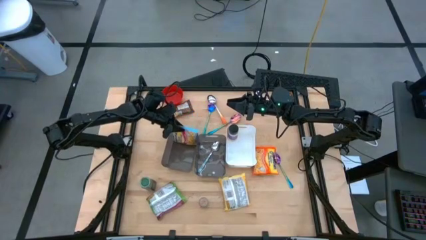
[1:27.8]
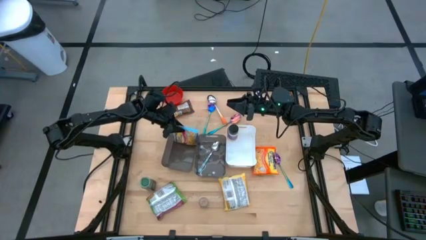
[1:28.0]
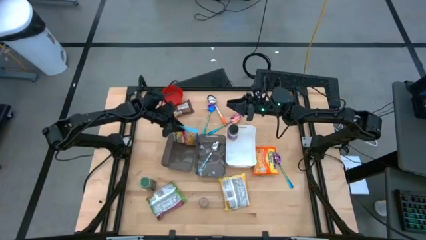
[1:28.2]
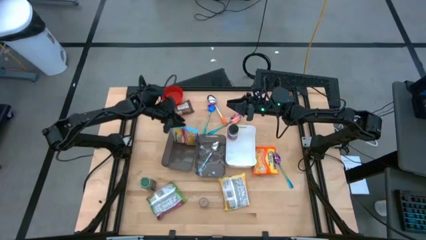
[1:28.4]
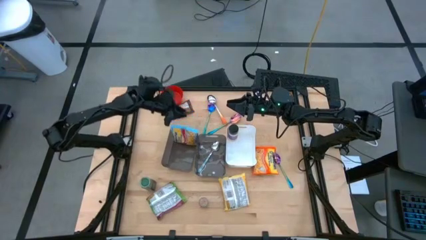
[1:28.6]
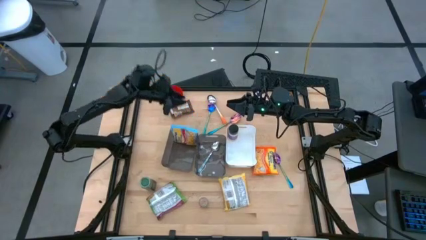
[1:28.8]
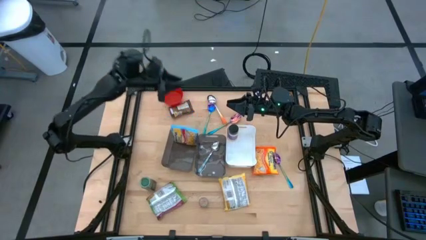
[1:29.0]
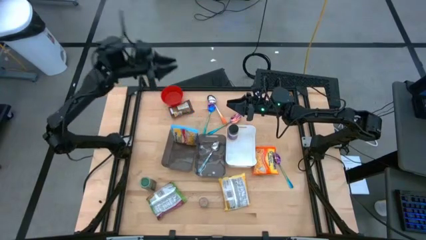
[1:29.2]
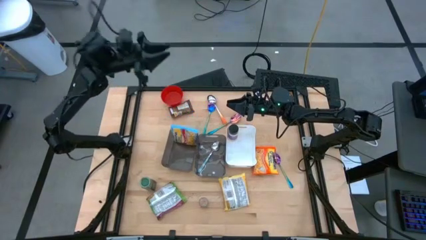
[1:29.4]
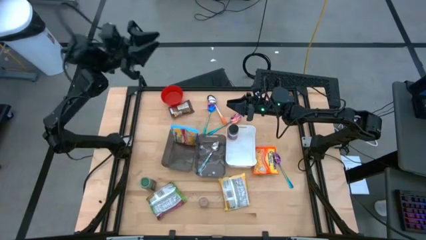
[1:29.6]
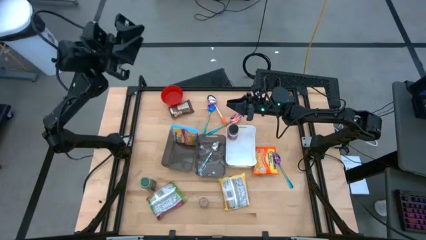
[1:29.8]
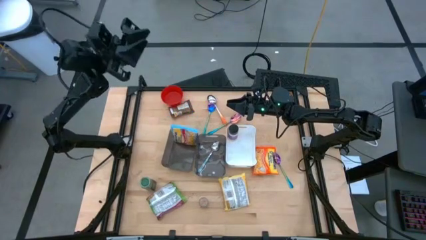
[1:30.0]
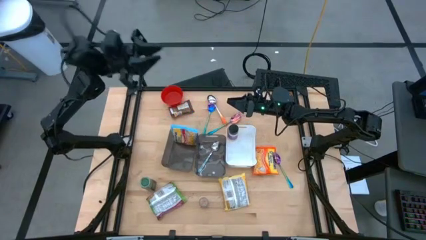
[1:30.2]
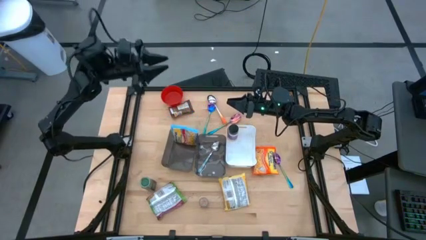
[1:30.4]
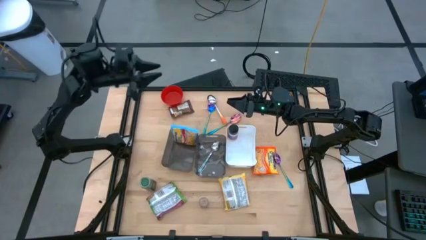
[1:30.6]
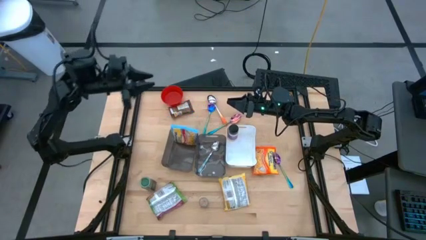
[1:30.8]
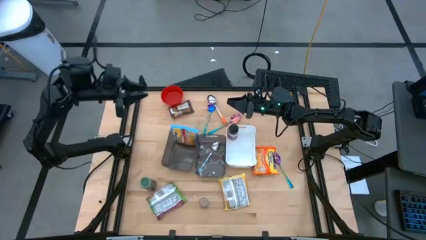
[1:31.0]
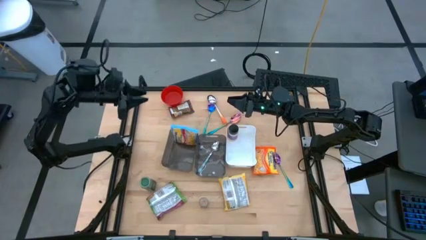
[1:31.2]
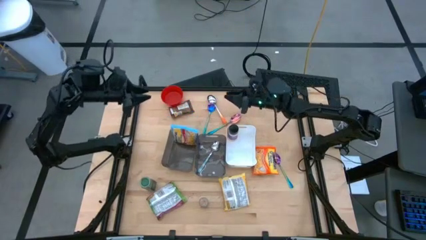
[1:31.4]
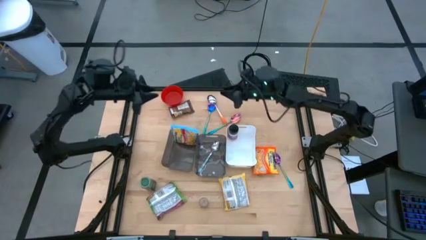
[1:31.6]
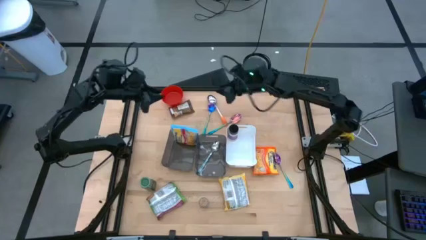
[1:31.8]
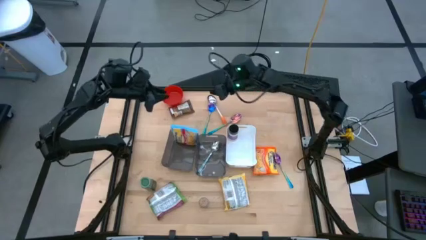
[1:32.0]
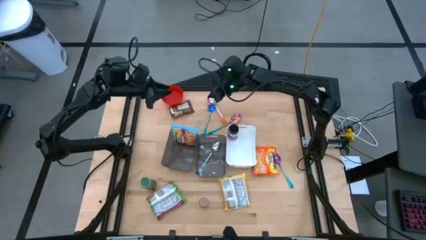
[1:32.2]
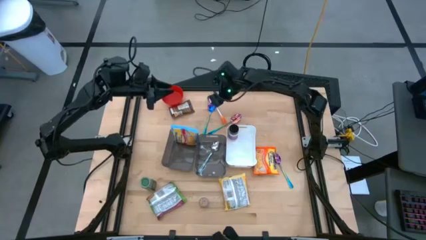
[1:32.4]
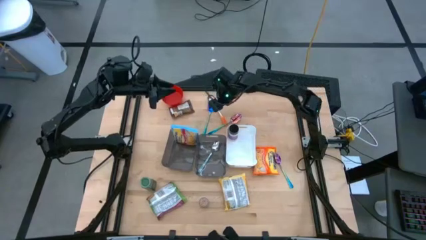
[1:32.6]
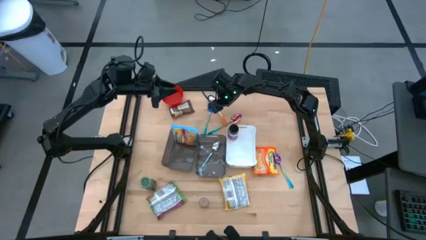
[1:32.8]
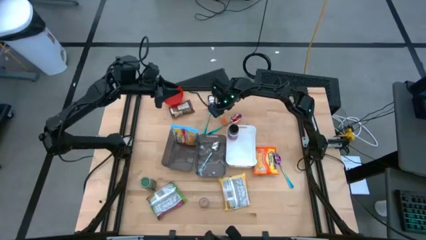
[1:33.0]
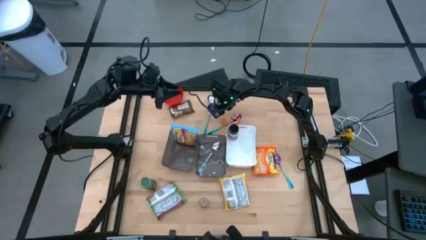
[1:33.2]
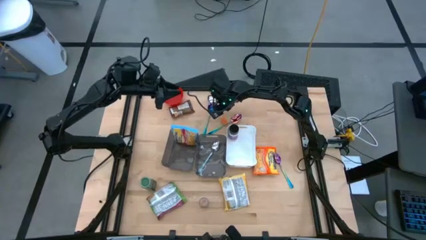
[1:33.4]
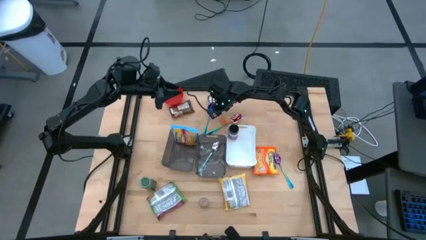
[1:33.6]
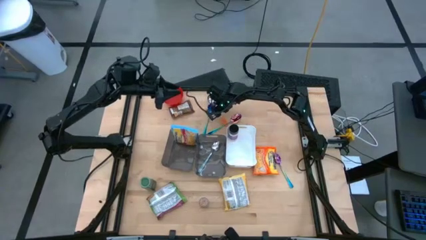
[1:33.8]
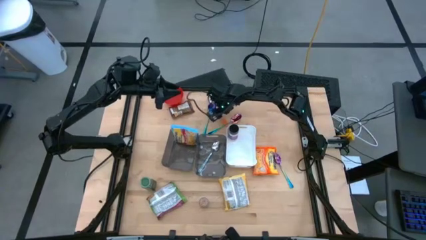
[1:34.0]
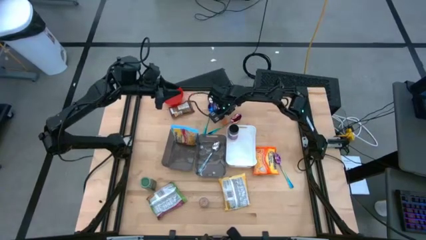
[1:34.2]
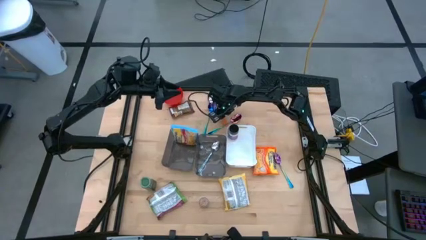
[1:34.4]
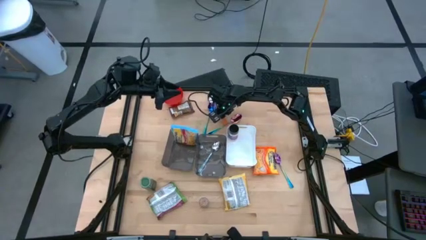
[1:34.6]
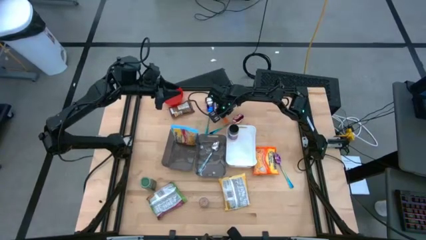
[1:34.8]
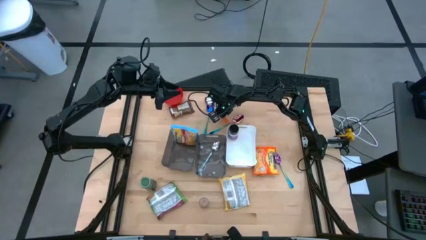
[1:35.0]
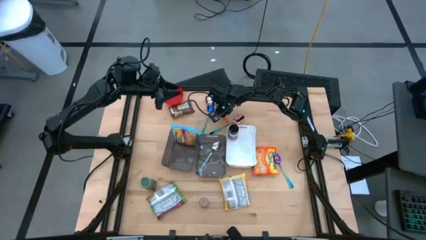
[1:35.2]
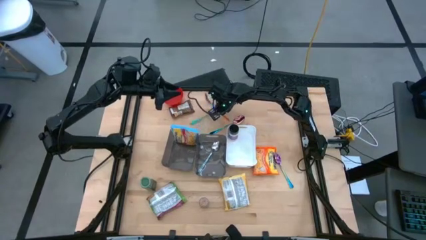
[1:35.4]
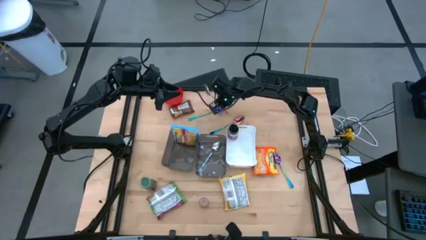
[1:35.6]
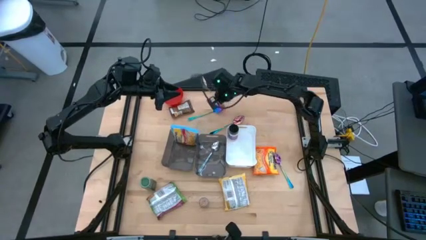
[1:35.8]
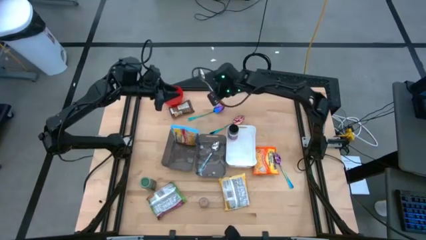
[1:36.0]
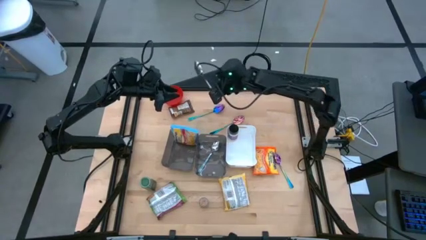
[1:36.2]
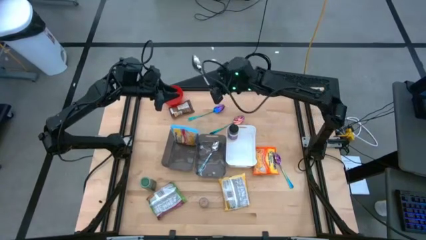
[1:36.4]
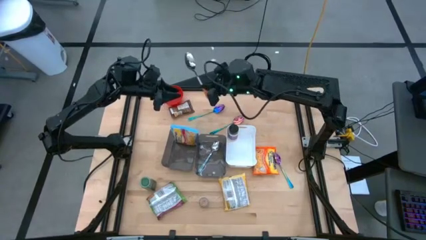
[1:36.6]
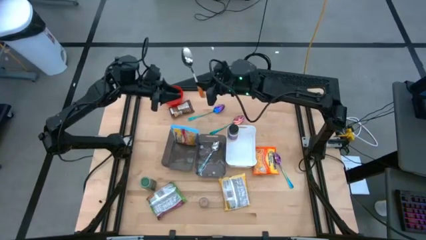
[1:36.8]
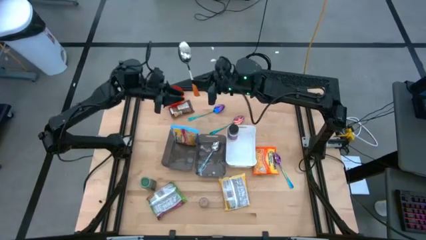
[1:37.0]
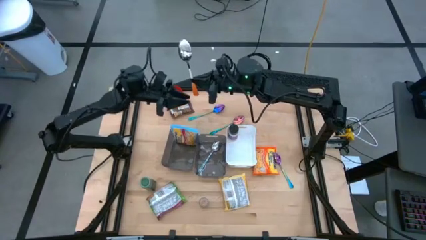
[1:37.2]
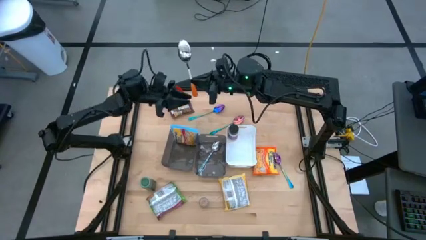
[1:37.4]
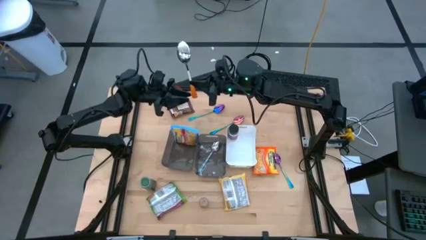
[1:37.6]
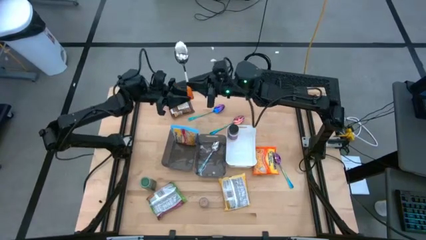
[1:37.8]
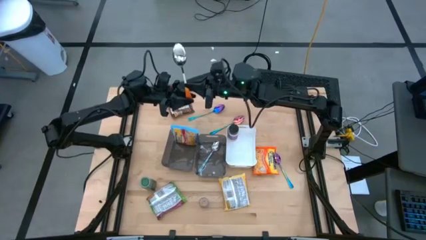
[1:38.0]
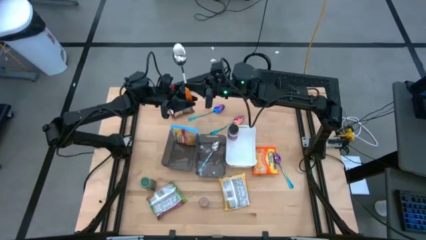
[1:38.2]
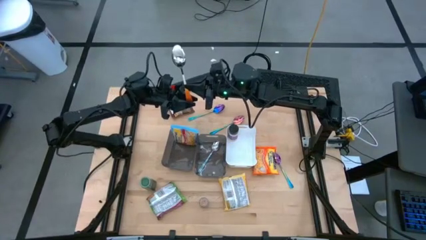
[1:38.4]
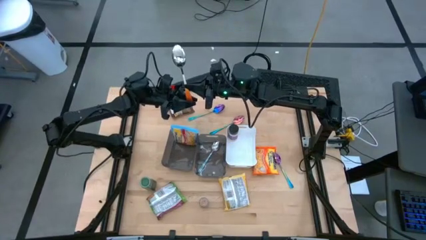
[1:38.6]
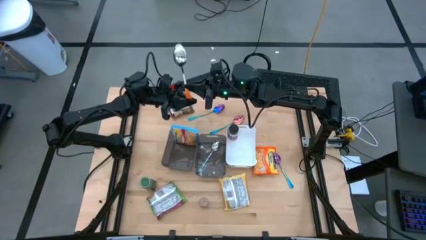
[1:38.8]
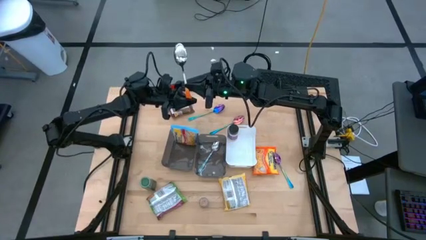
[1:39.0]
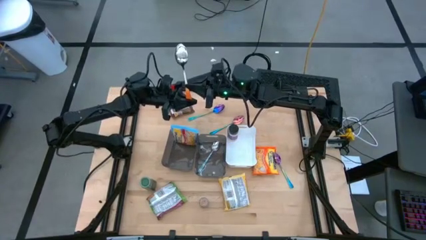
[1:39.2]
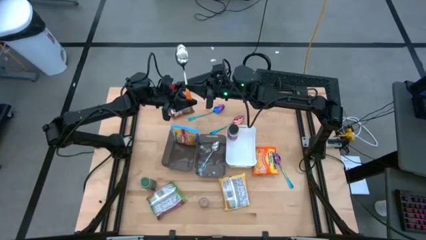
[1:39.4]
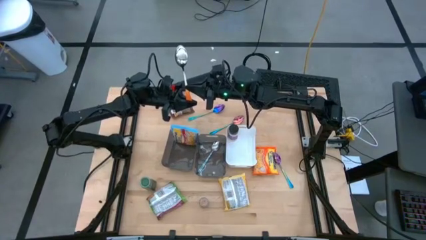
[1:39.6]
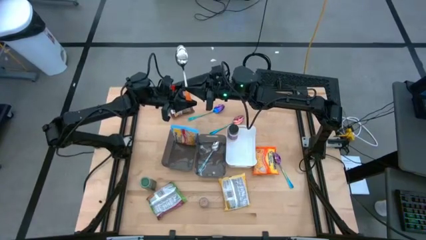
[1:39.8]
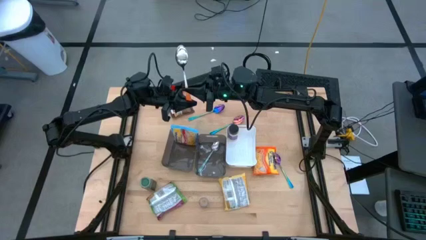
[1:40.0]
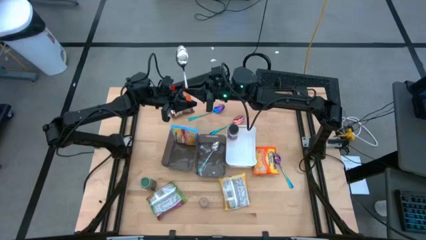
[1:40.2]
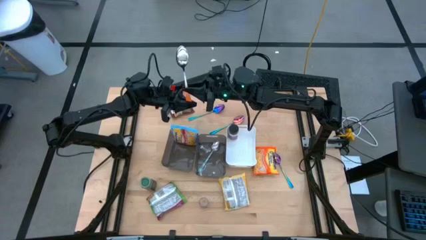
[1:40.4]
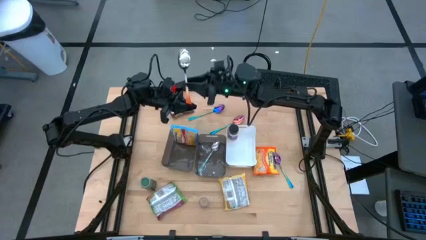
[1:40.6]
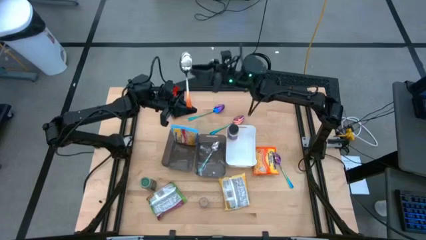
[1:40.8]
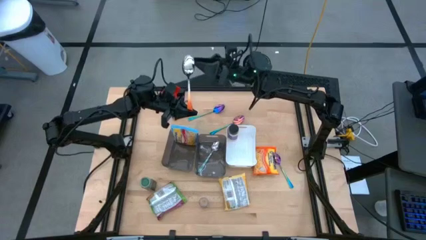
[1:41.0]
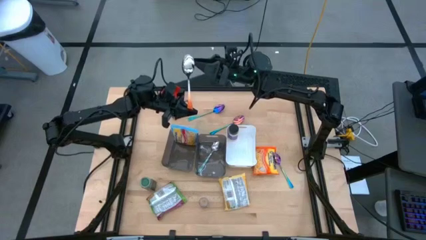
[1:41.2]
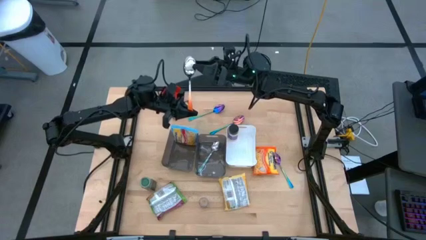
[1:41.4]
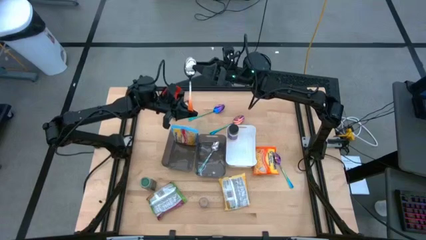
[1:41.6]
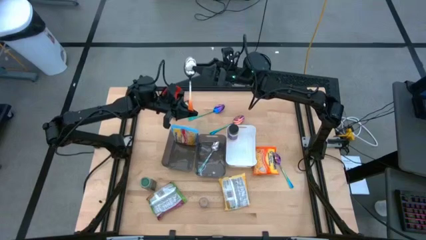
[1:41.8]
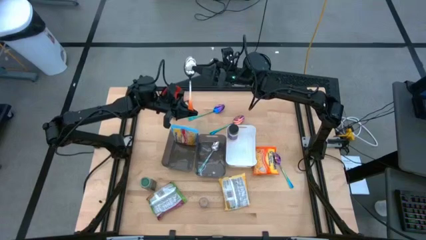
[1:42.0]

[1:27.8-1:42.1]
Task: Pick & Place Food Item
Put the orange spoon into the right gray bin

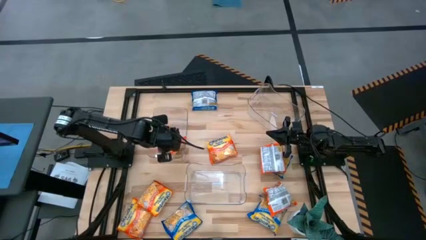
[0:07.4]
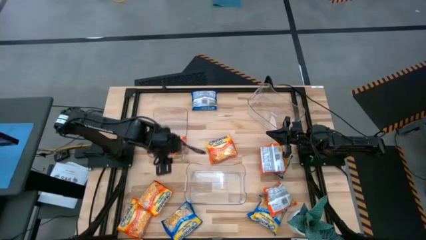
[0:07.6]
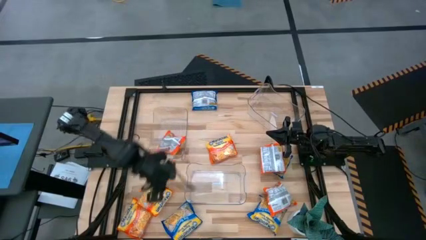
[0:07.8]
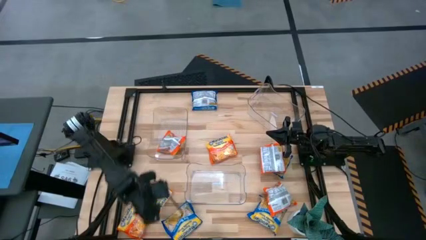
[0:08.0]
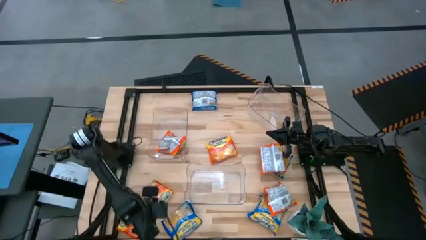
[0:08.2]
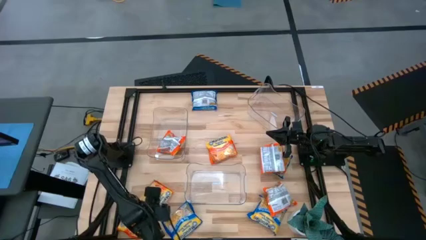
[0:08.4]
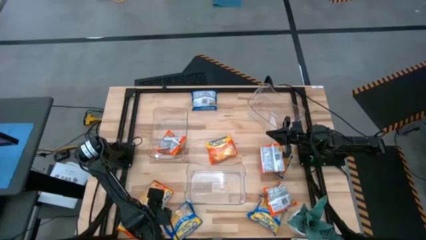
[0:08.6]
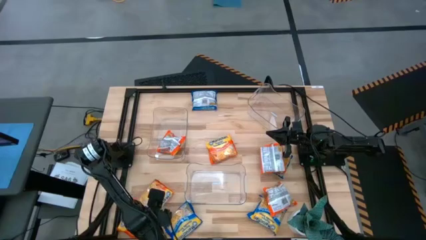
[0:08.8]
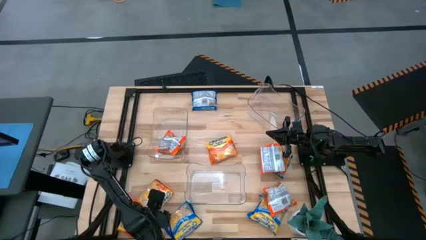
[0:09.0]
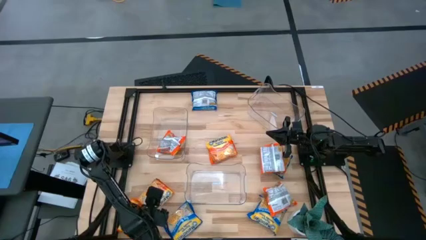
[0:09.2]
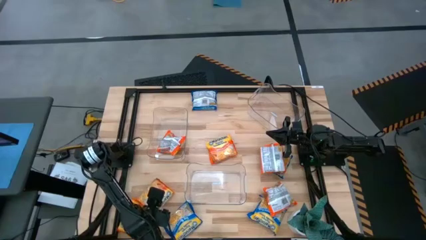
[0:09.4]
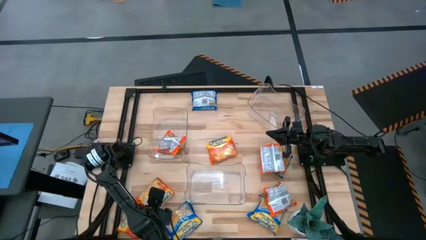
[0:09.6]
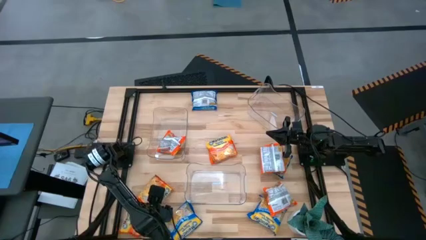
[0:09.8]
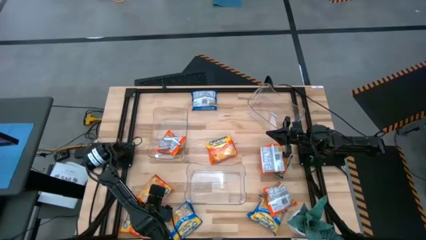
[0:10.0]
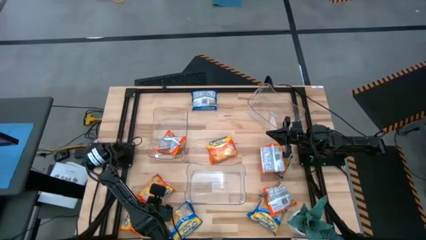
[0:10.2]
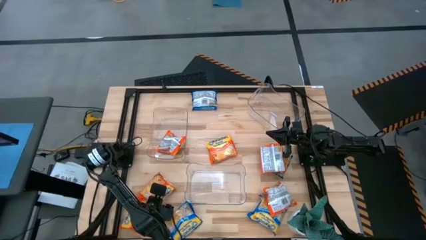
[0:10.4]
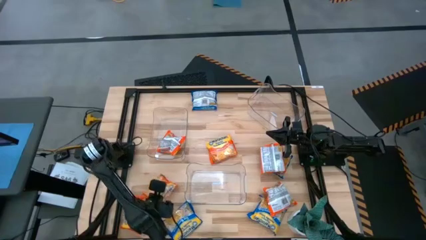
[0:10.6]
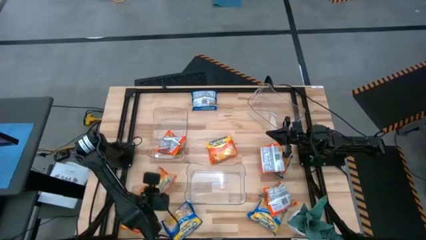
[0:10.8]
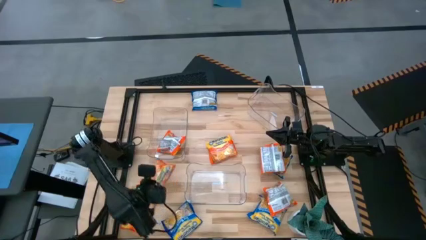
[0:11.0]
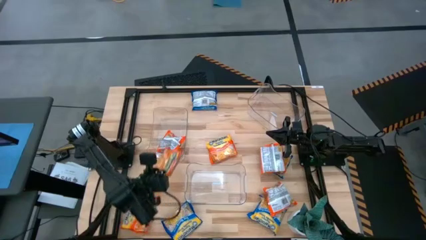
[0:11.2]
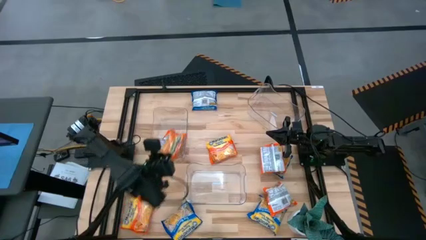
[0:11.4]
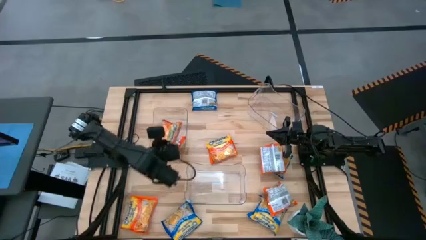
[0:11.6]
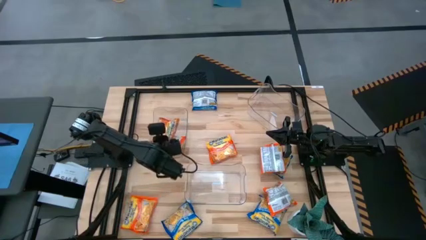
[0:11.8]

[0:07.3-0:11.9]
Task: Sort Maruchan noodles
Put the orange noodle pack into the middle transparent bin
